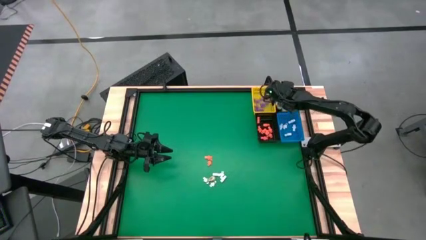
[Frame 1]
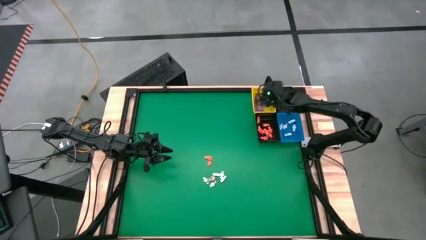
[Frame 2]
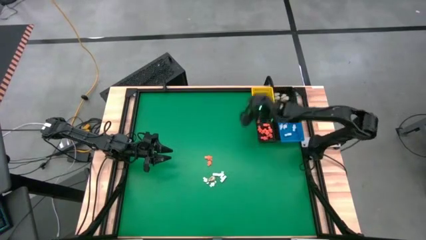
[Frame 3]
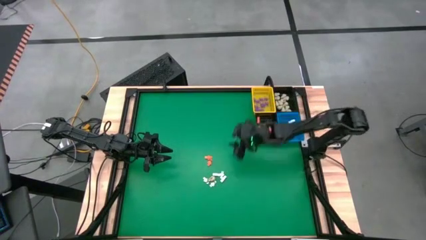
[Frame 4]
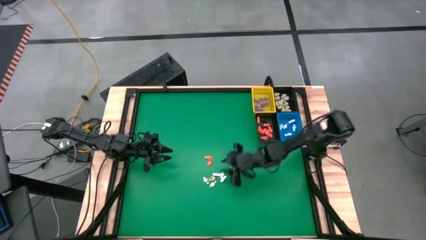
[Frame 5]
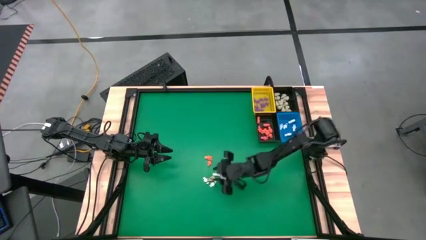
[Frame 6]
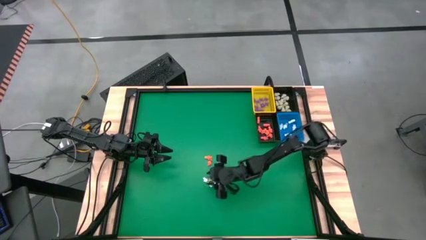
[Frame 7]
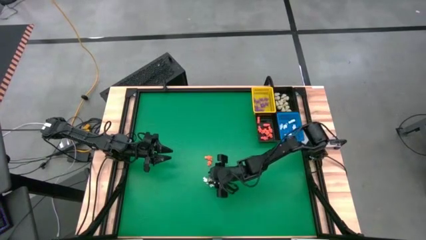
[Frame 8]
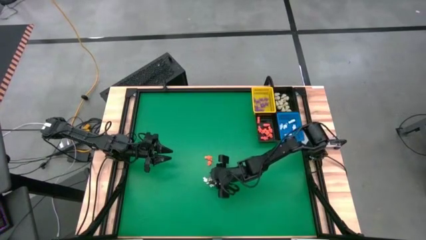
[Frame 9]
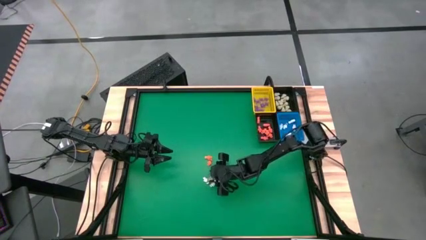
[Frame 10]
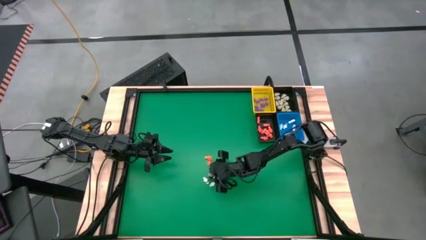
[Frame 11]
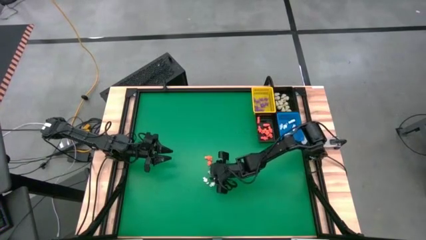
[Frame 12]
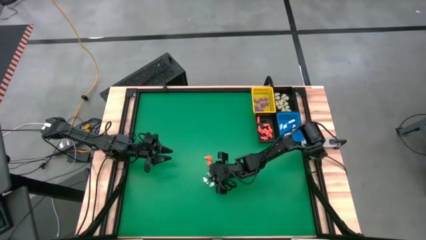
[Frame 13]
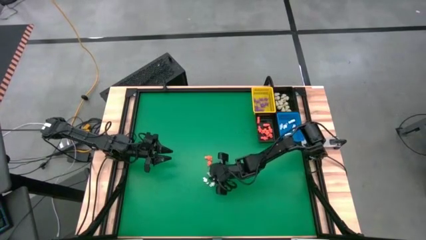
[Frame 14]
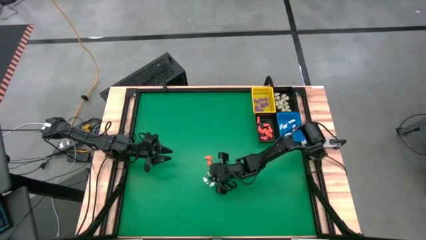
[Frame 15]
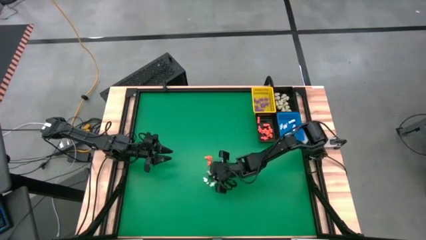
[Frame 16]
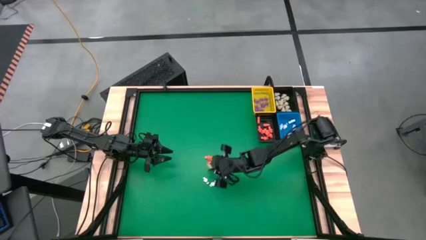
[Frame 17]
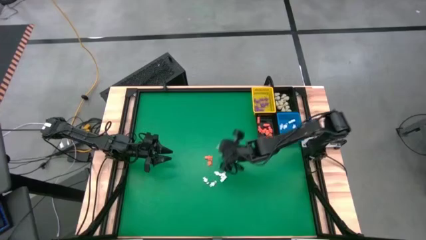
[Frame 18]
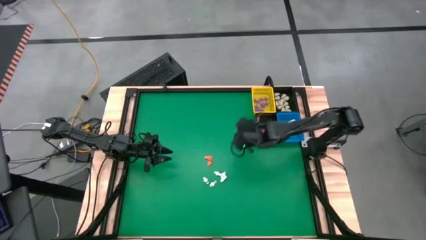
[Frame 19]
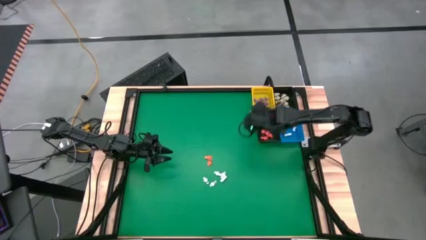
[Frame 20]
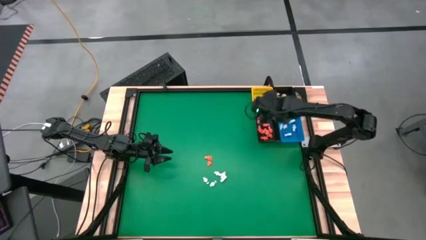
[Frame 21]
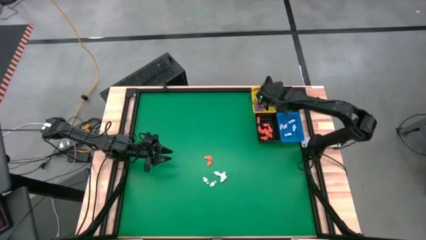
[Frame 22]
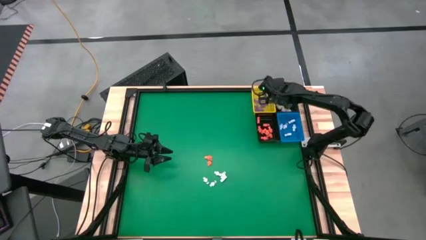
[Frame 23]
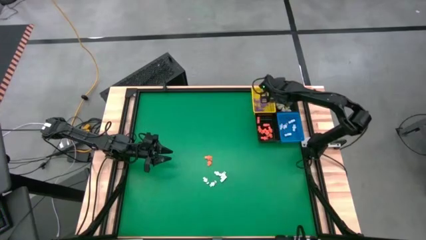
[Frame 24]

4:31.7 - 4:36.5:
Task: Sort Halloween decoration
Put the gray skull toy into the top black basket

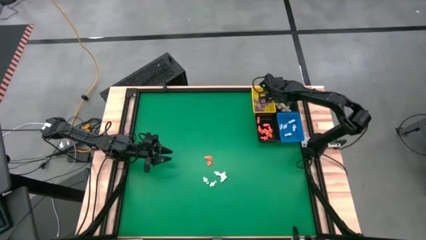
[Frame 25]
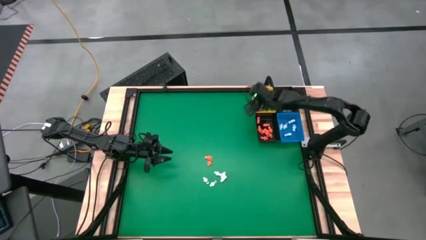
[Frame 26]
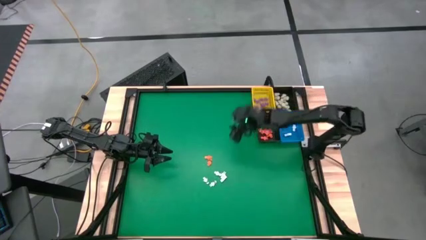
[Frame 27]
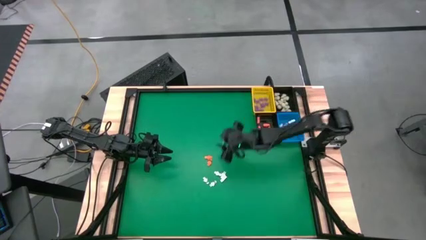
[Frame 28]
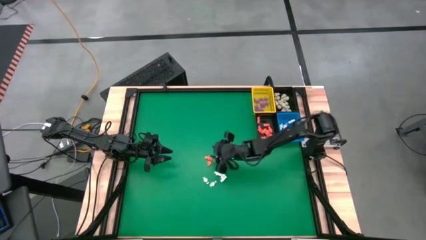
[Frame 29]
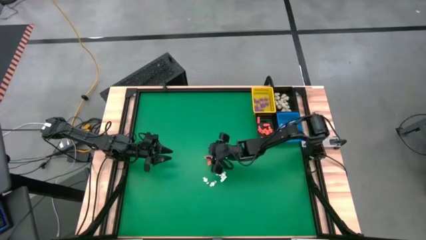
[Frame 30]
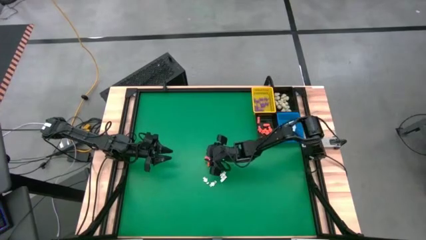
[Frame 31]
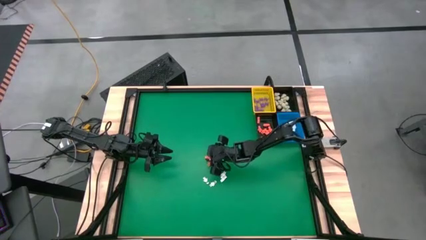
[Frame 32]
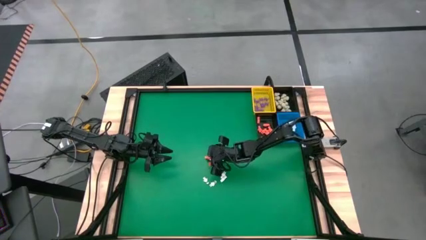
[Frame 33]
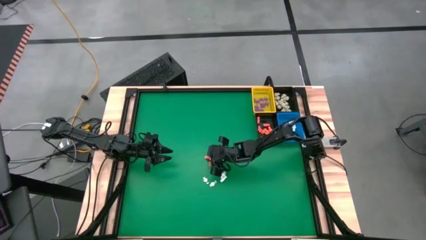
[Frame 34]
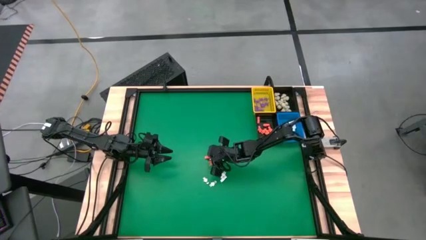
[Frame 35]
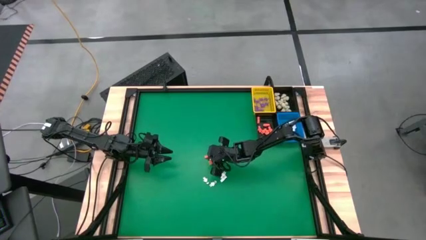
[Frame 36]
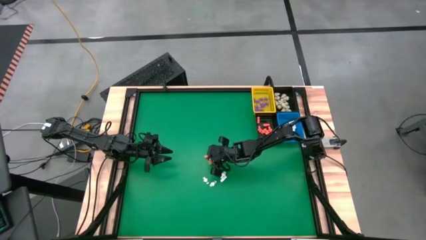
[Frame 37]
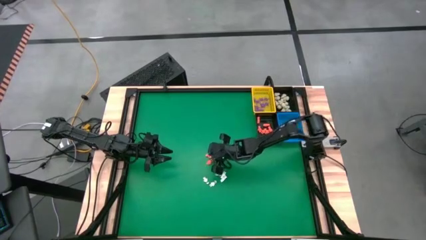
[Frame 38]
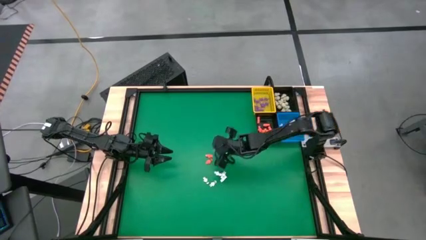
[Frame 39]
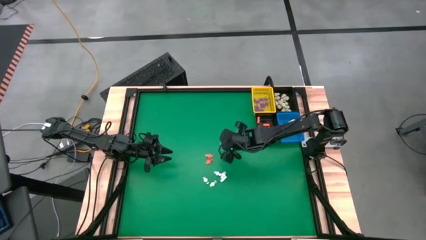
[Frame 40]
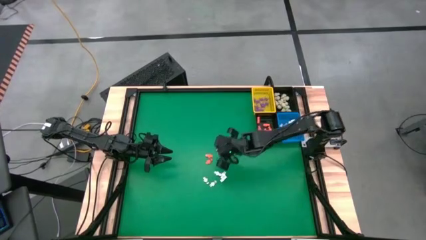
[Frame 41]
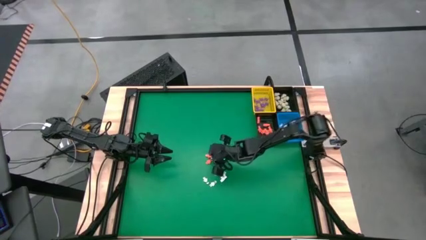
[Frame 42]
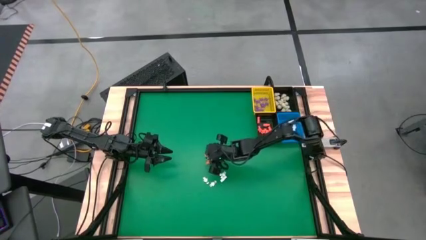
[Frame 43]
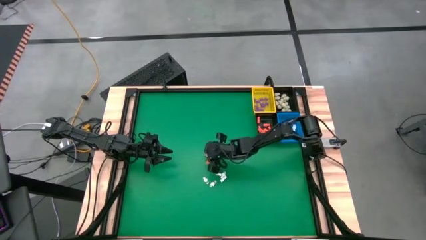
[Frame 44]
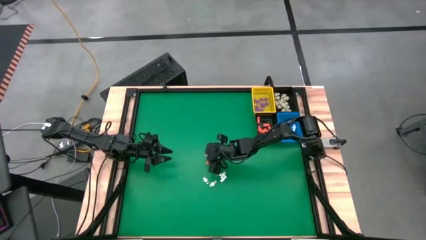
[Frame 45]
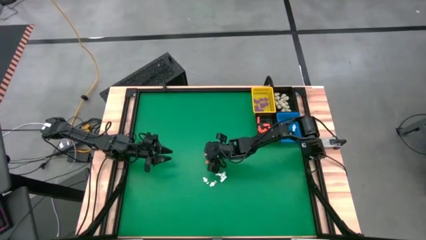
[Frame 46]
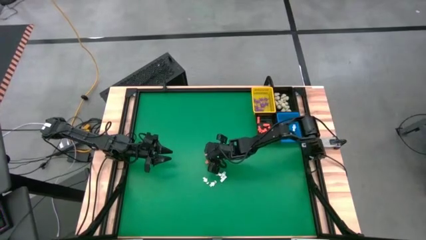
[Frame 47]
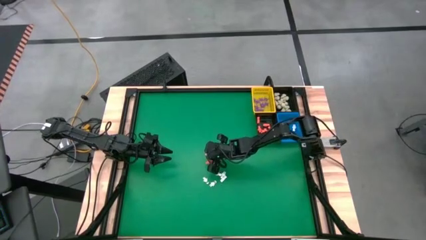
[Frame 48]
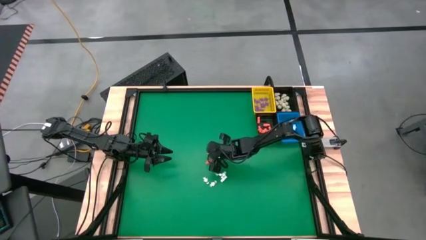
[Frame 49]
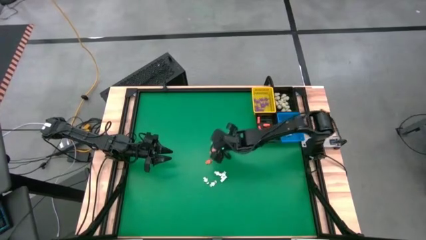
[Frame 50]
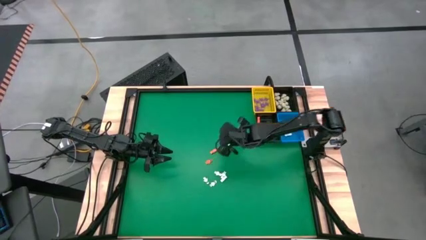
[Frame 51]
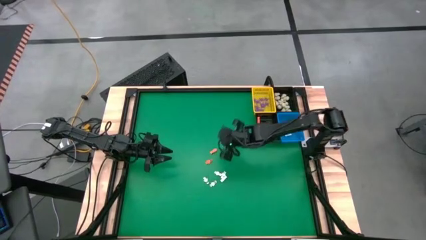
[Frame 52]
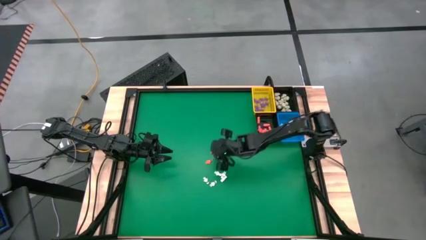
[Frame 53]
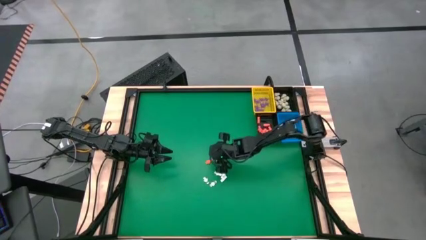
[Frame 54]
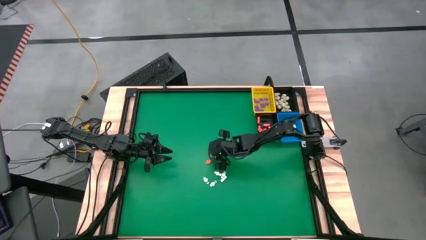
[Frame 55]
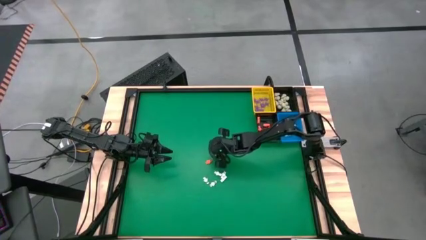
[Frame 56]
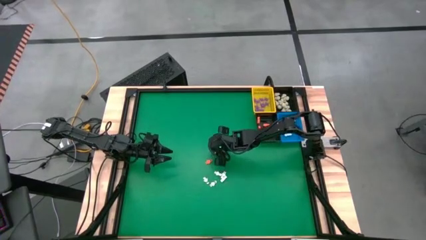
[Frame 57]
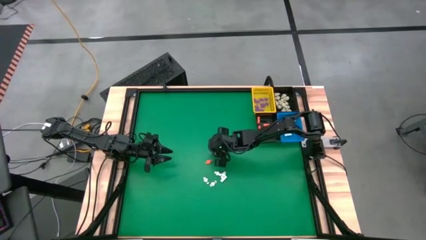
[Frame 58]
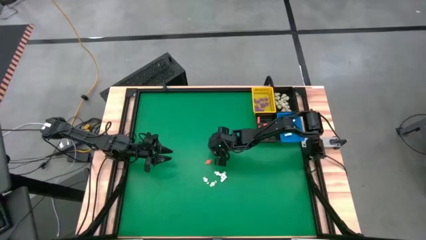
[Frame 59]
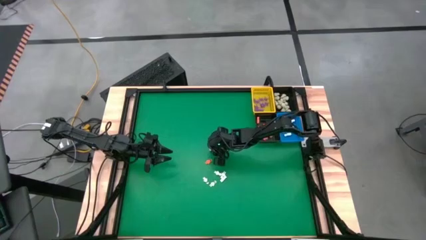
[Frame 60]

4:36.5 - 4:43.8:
Put the orange skeleton toy into the bottom black basket

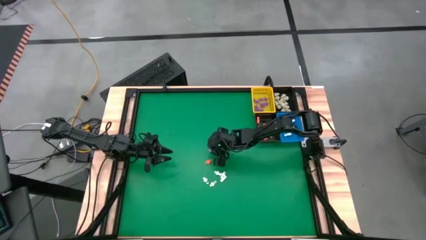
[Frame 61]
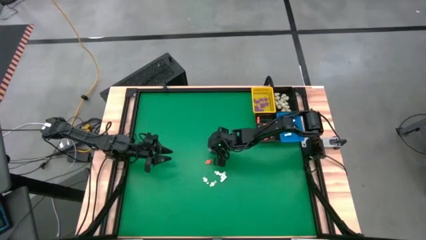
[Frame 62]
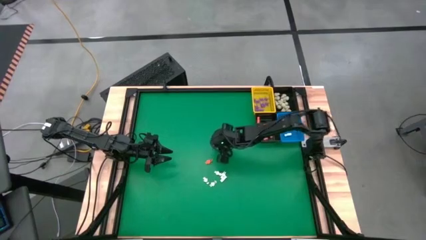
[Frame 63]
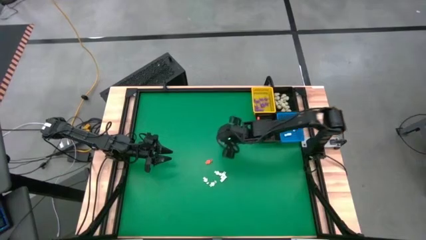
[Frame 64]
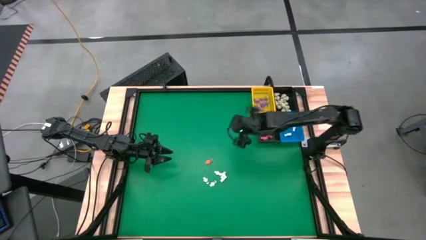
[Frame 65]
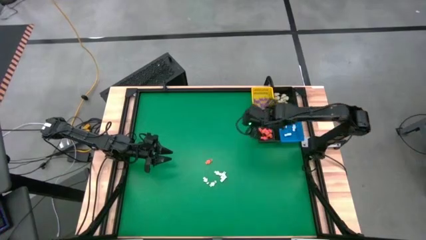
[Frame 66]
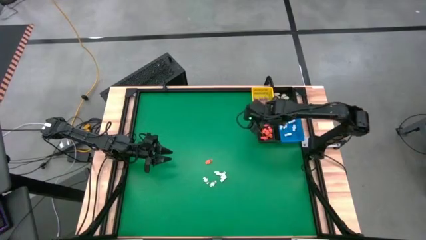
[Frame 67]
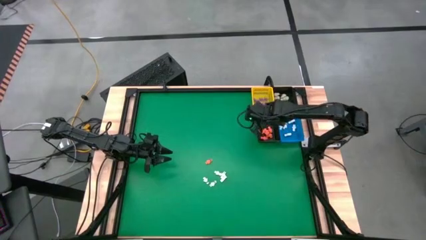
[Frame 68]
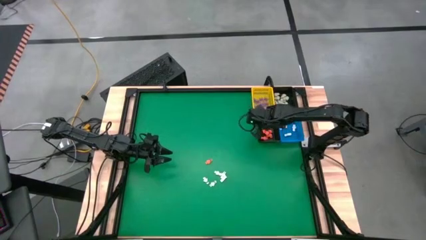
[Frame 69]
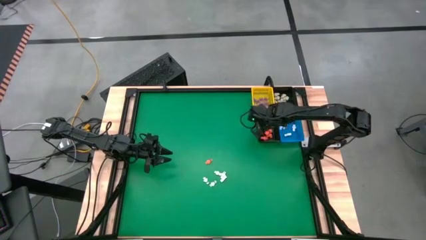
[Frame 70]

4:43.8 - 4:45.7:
Put the orange skeleton toy into the bottom black basket
